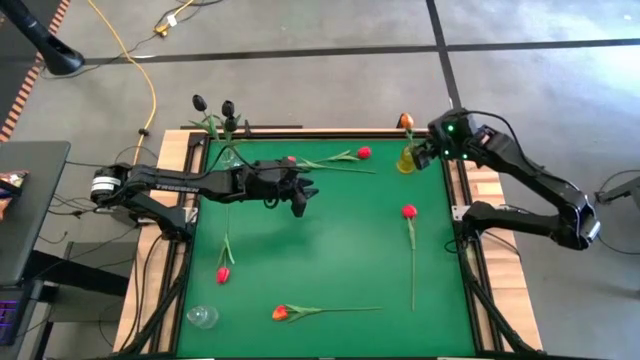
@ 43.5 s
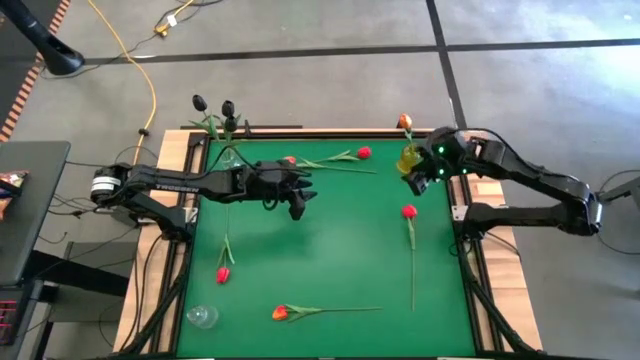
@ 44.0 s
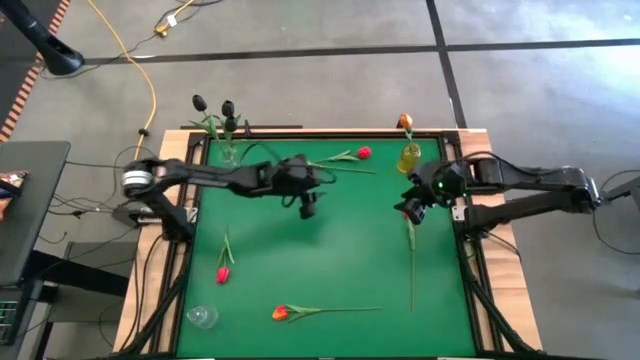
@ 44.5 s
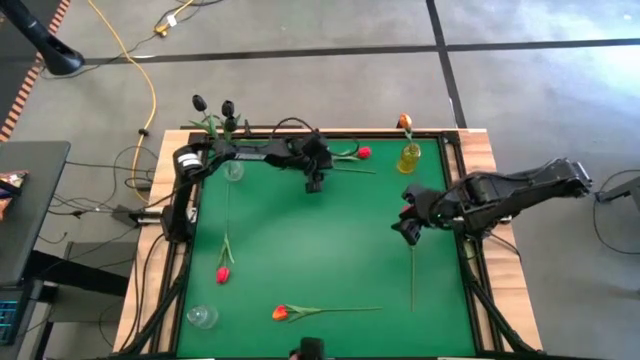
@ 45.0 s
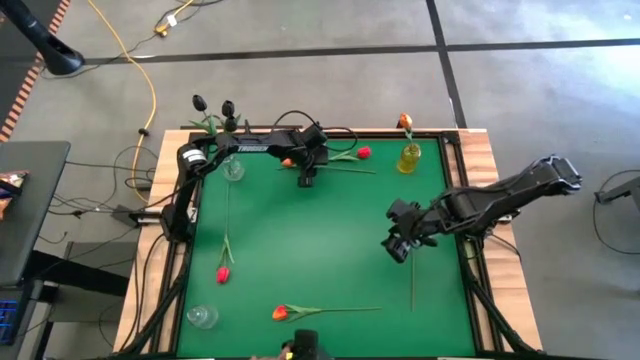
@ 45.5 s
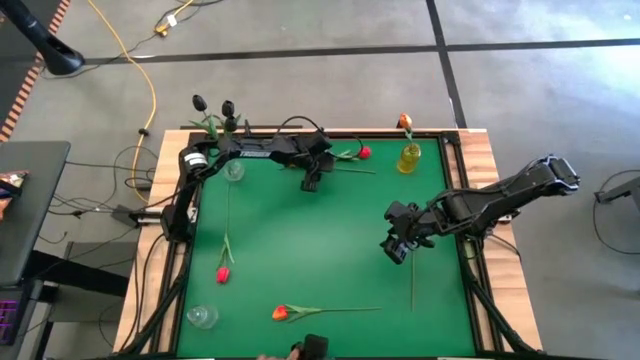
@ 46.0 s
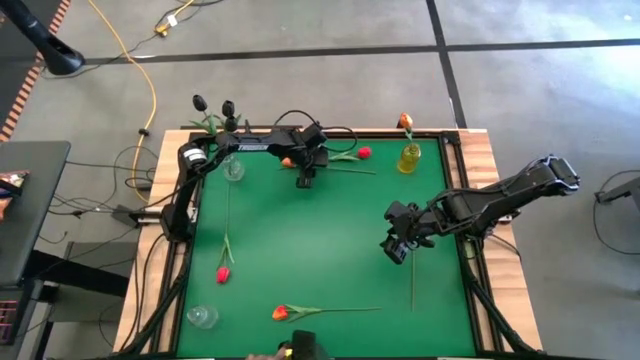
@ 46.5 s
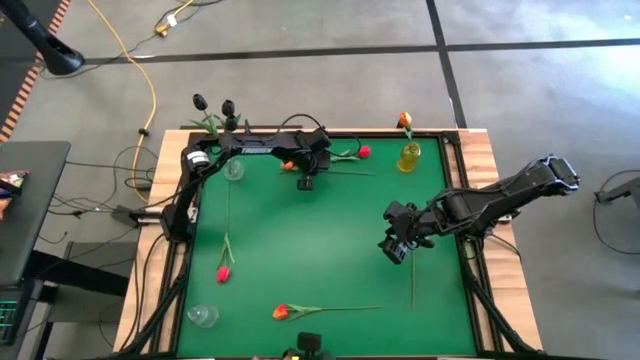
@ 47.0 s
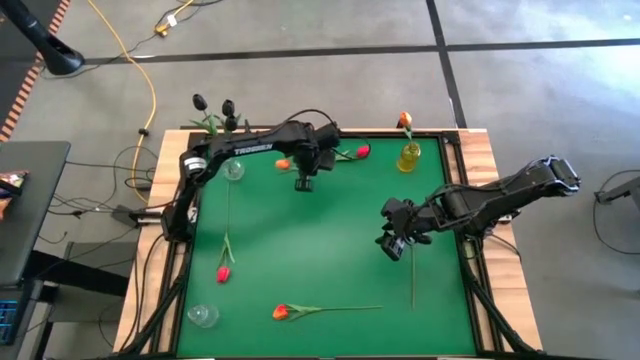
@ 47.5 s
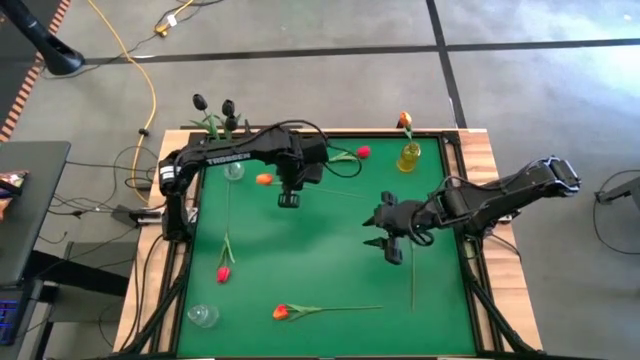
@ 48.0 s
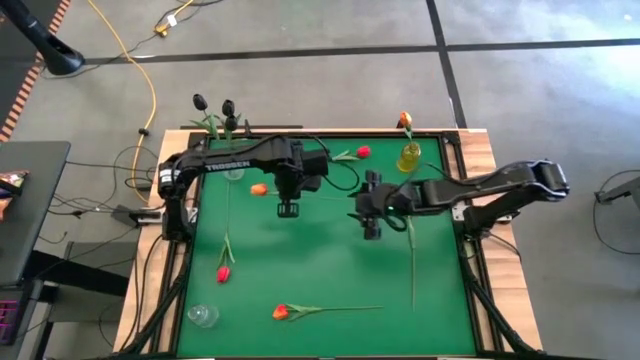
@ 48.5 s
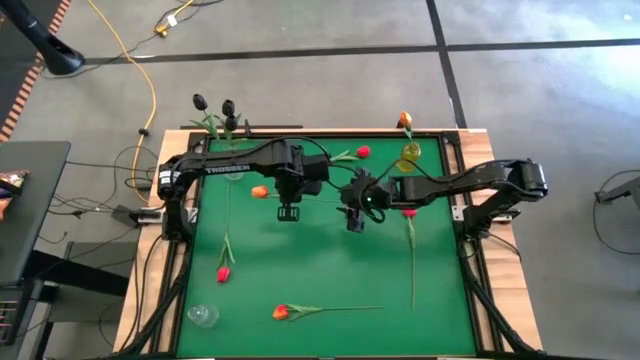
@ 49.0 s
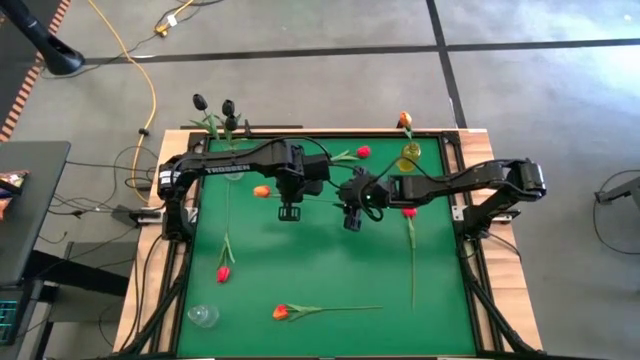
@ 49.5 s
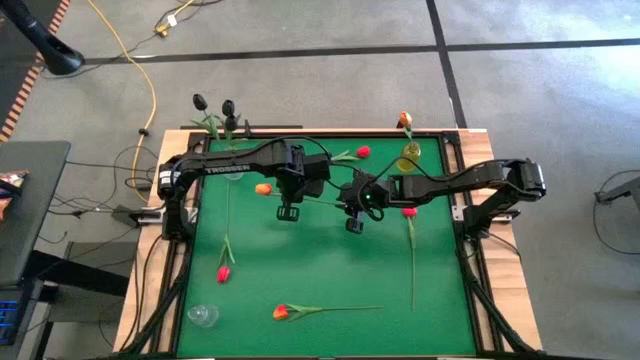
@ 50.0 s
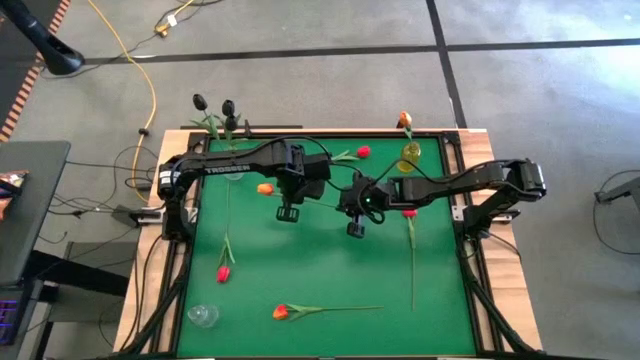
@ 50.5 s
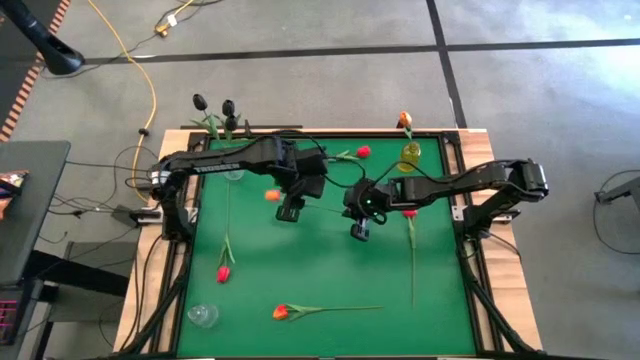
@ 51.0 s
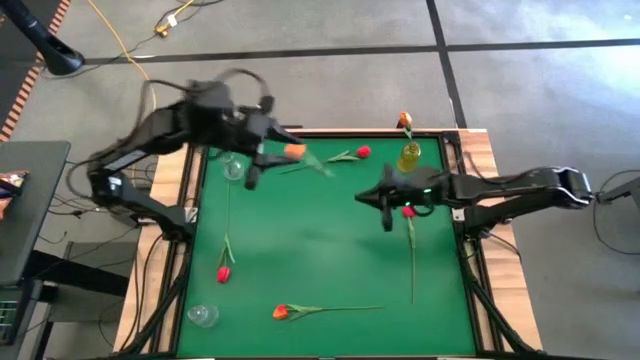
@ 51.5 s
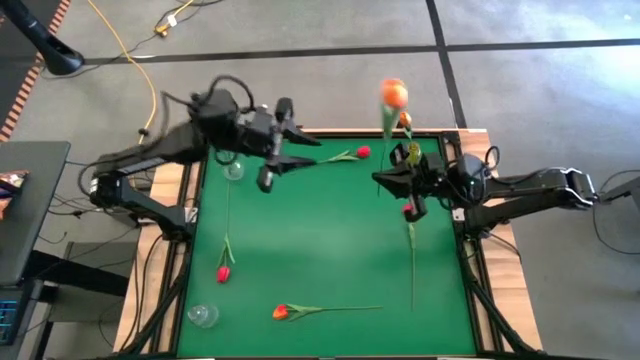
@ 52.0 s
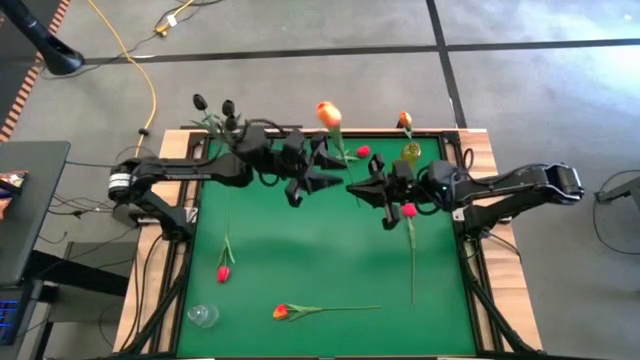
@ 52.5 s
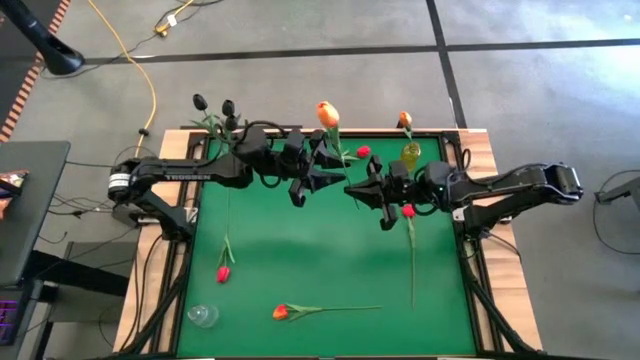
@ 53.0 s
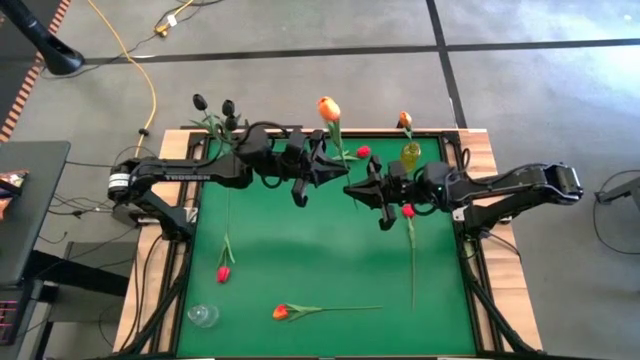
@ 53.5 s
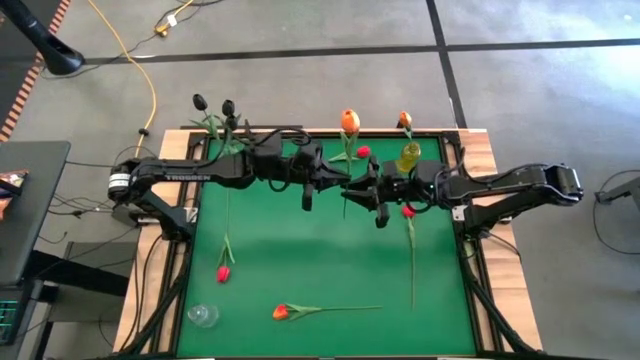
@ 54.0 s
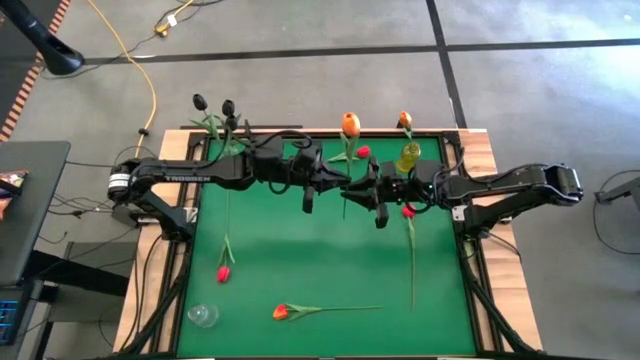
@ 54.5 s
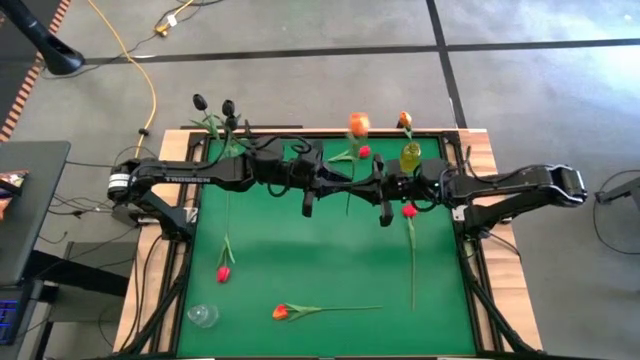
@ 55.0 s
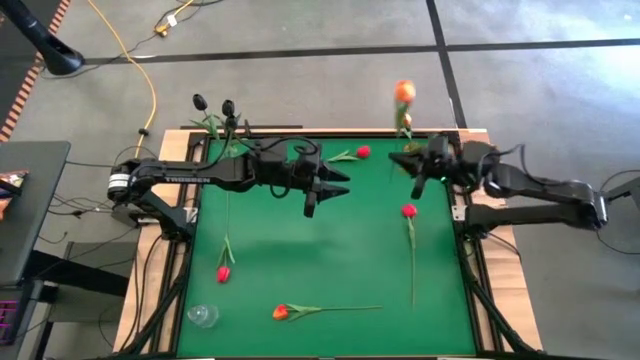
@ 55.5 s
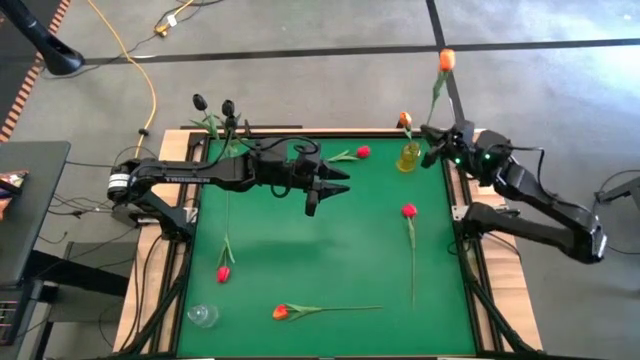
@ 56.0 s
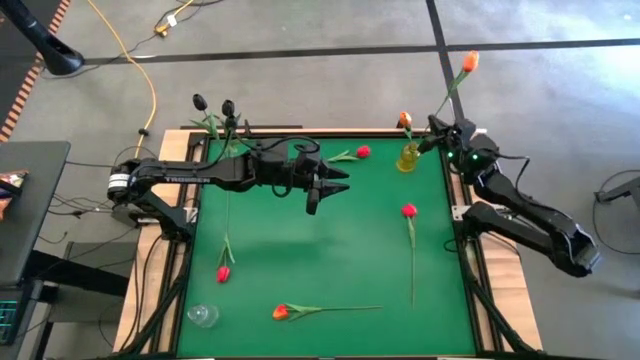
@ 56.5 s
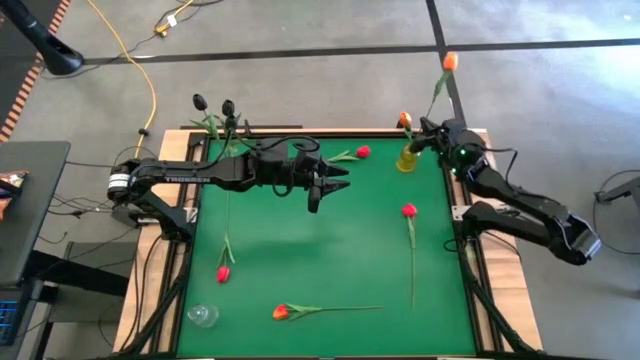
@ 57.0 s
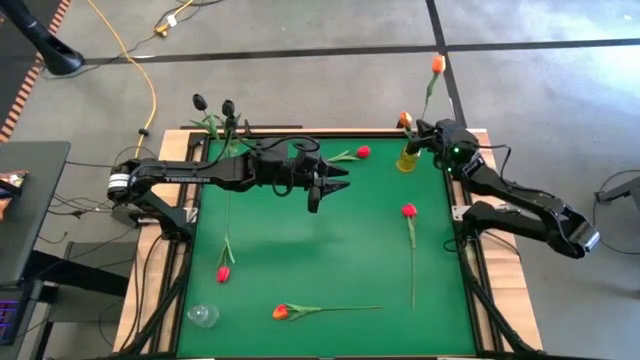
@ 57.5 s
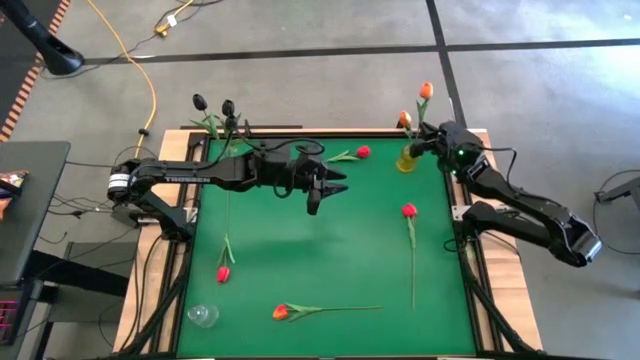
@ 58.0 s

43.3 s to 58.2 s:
Task: Sort flowers into vase by color
Put the top orange flower into the yellow vase

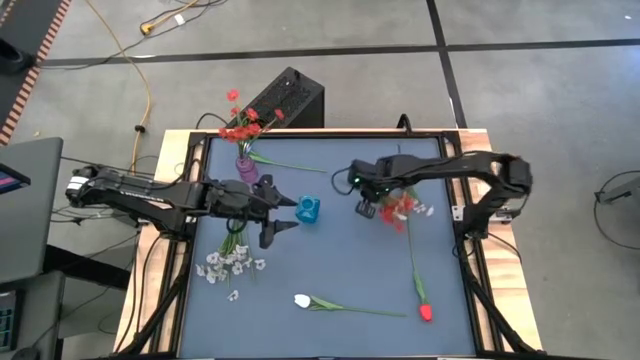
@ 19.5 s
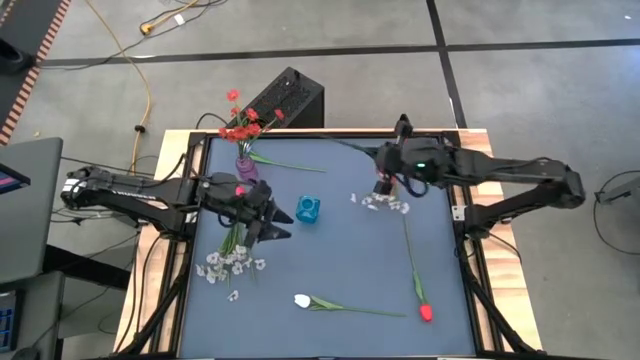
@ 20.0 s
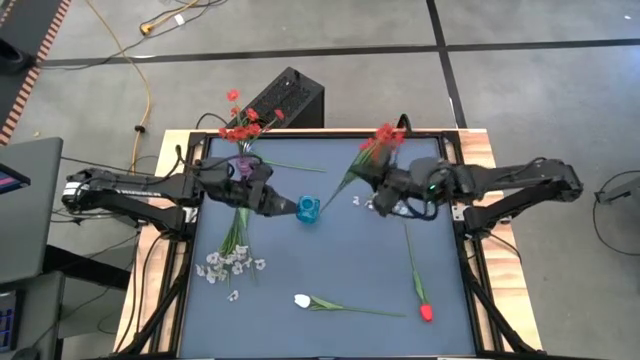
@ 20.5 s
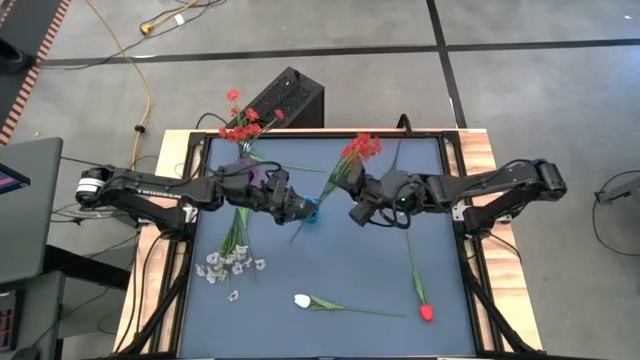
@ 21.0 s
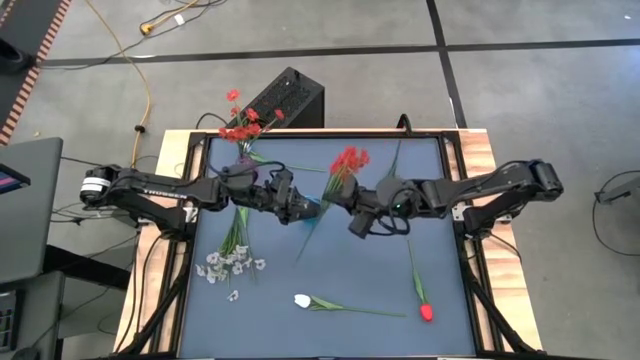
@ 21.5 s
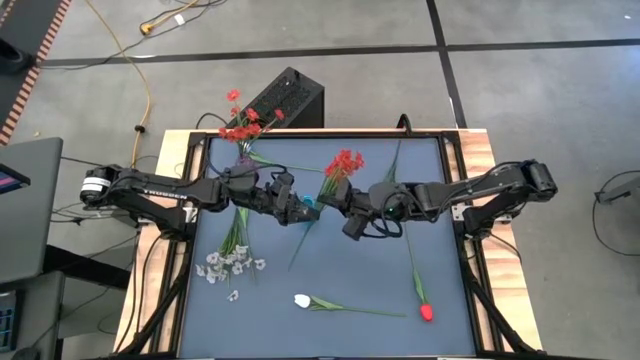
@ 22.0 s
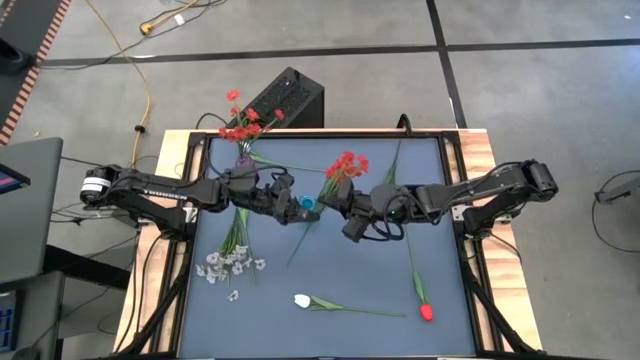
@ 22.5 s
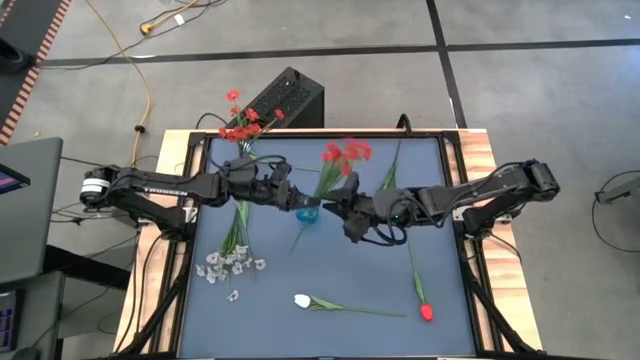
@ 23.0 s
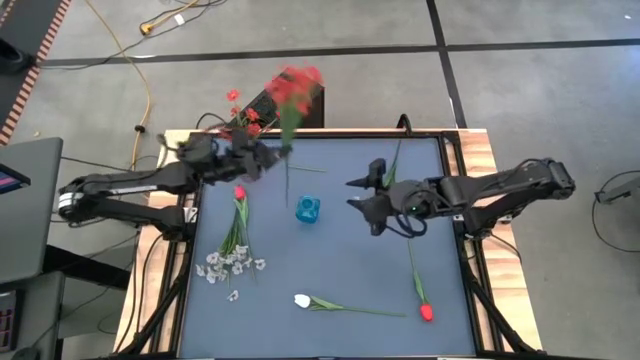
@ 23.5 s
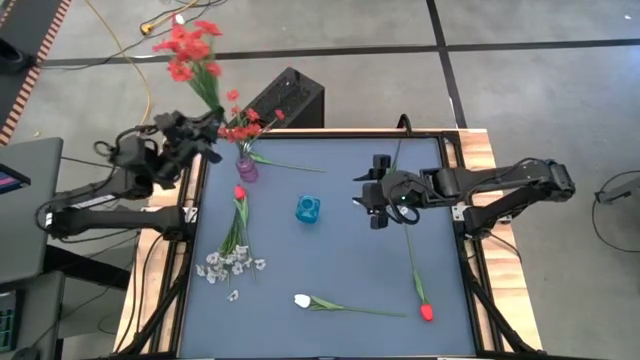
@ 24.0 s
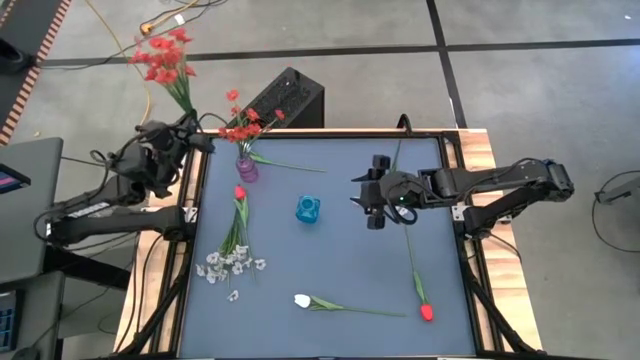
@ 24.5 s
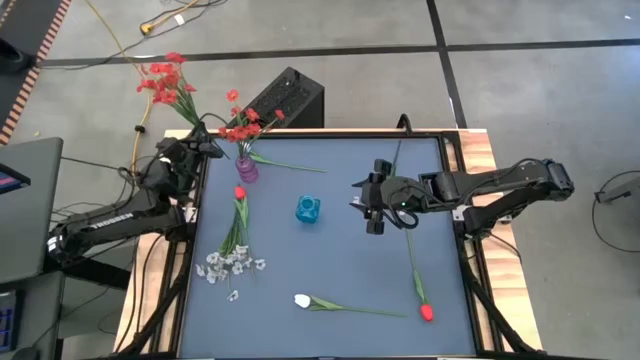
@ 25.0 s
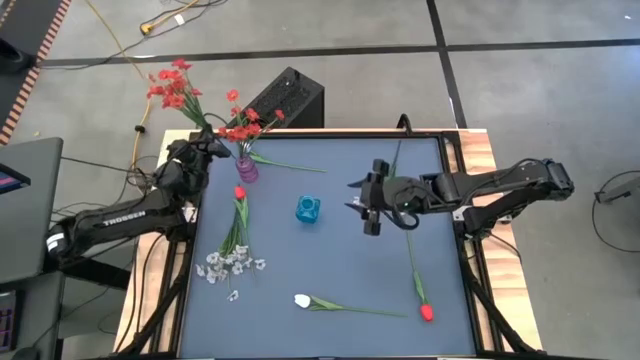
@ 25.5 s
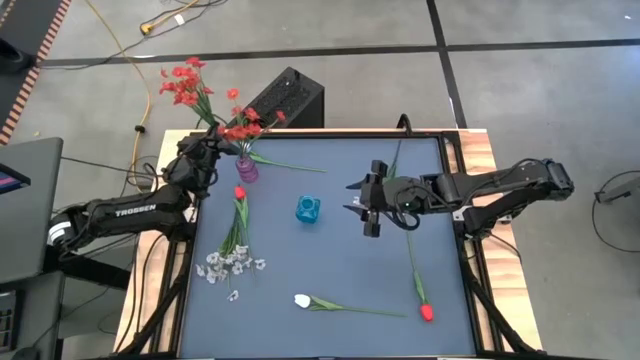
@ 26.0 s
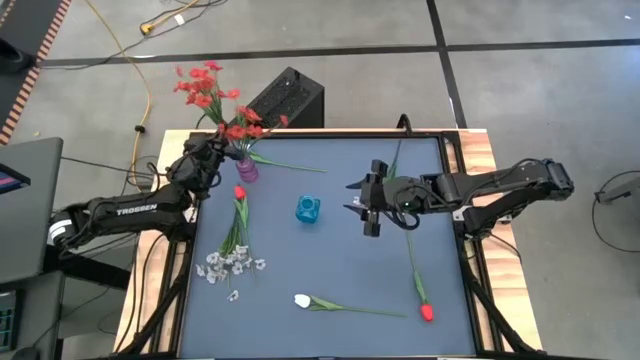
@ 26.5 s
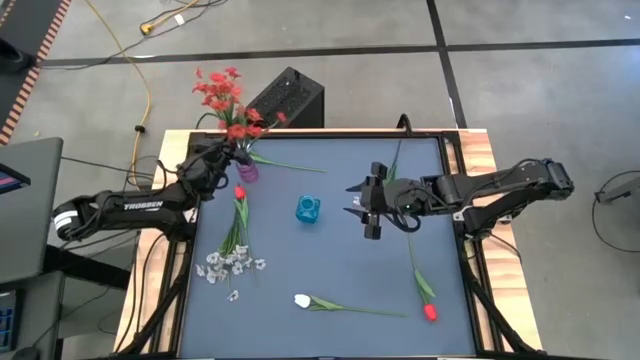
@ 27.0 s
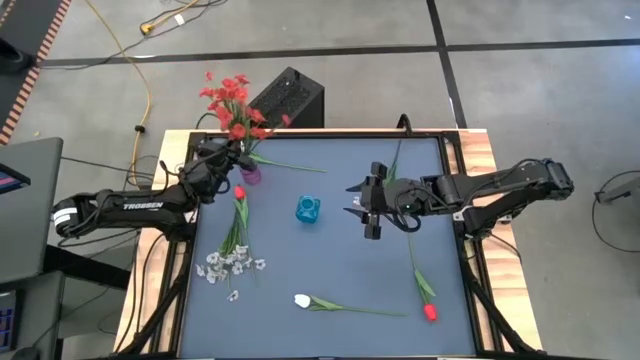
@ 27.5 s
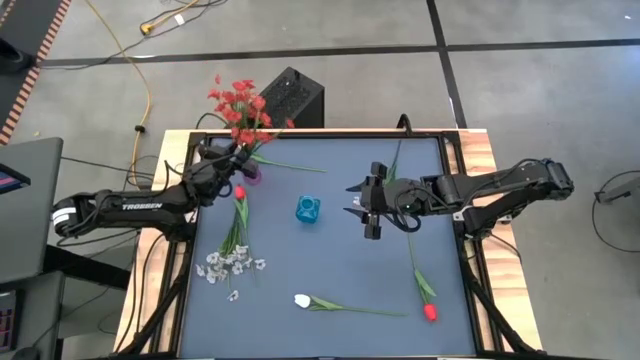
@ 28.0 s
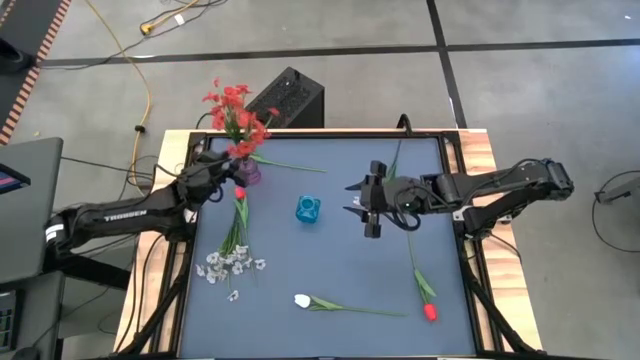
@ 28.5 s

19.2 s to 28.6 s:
Task: Sort flowers into vase by color
Put the red flowers into the purple vase
